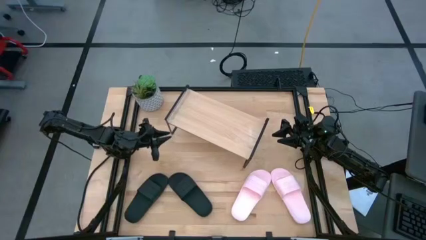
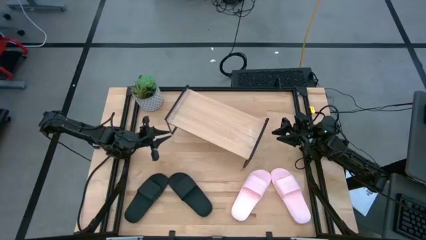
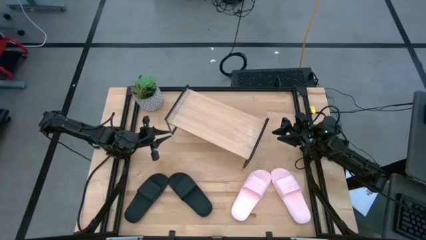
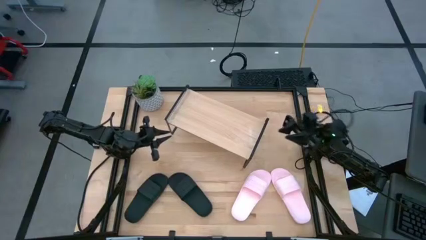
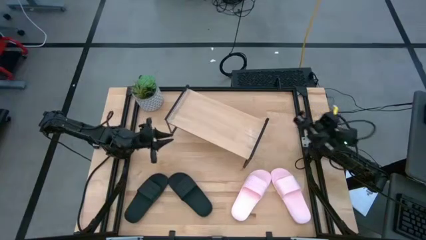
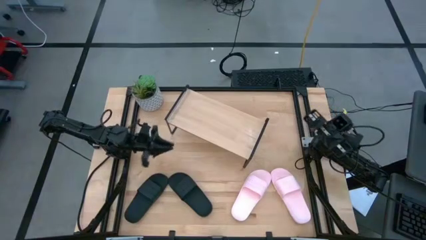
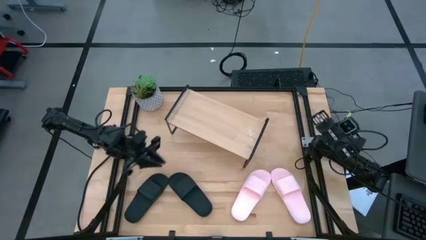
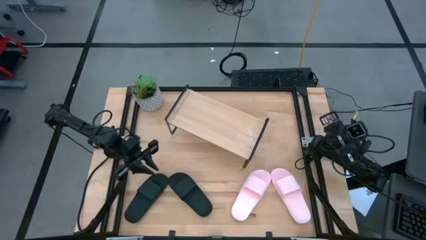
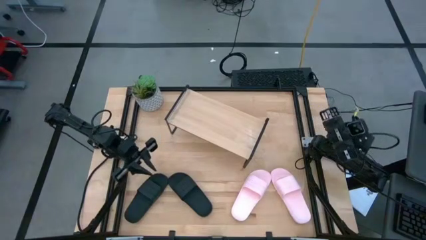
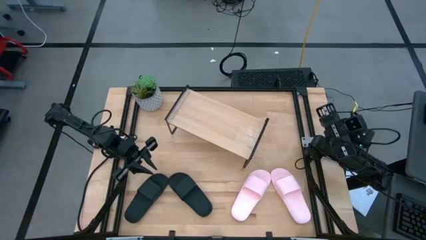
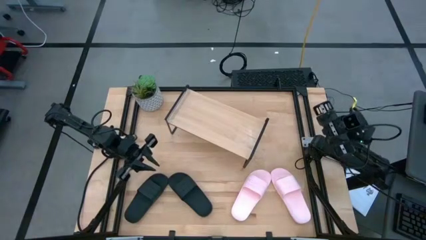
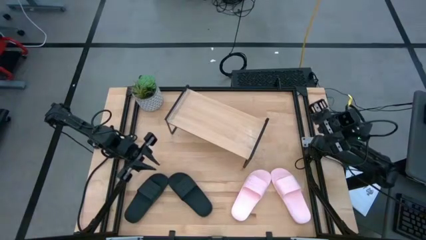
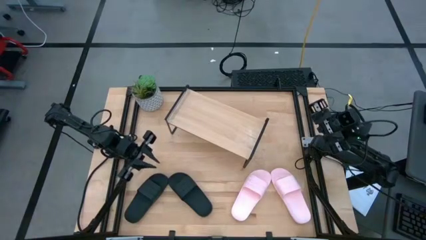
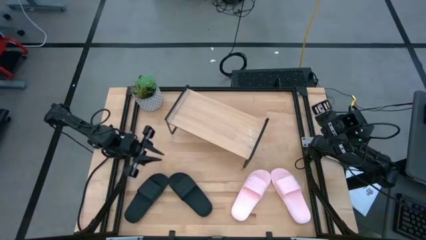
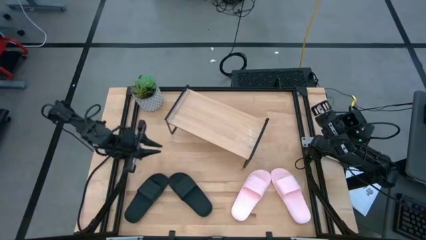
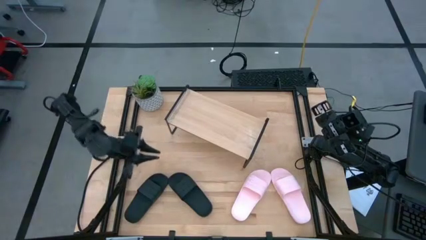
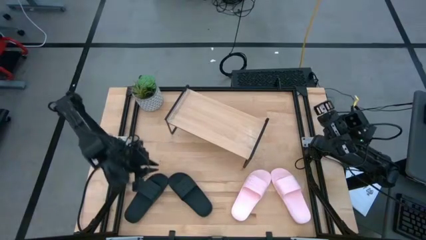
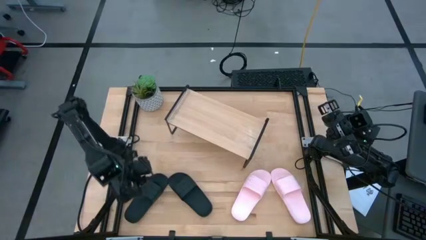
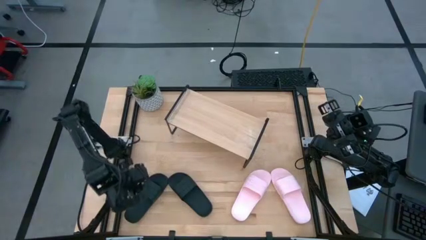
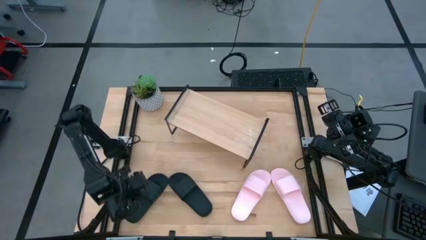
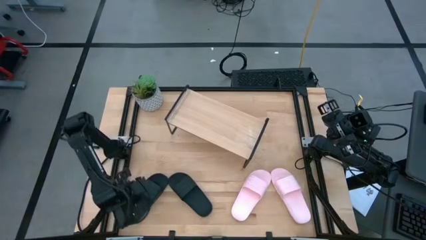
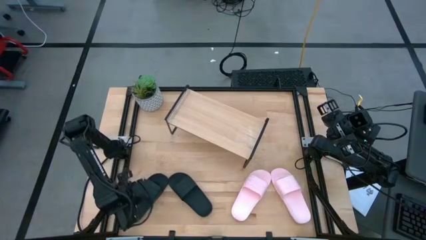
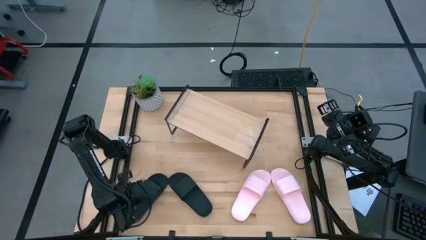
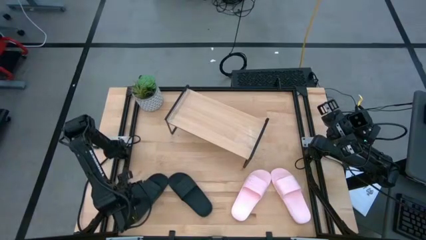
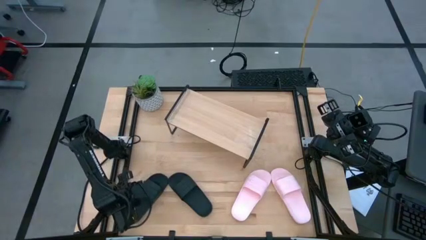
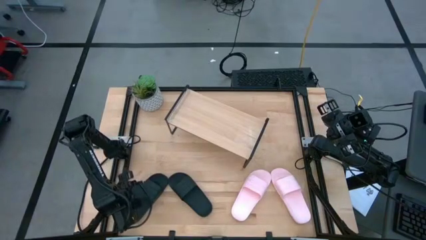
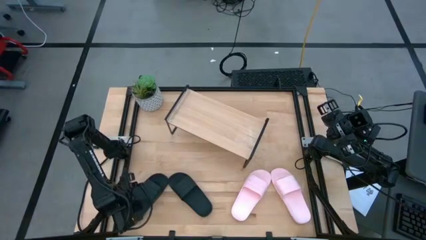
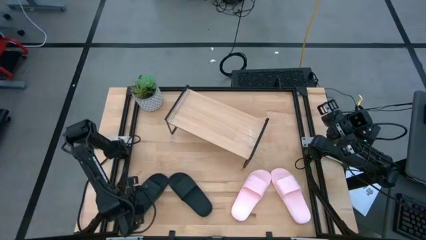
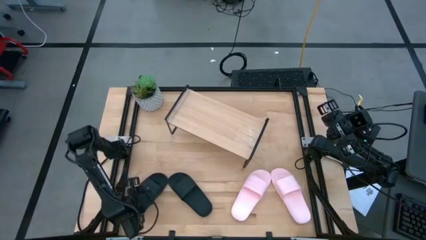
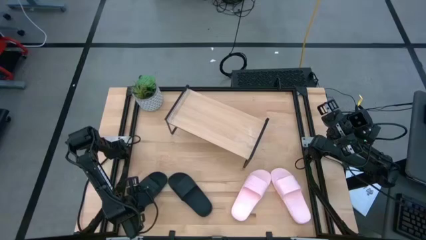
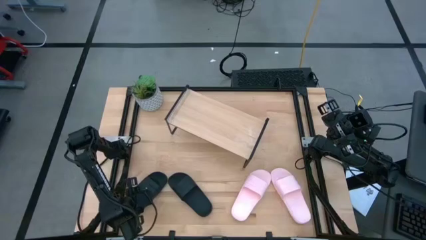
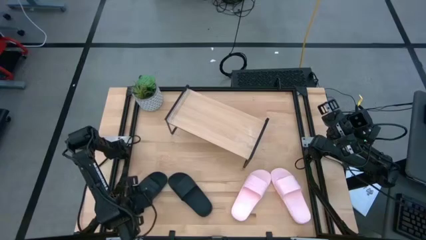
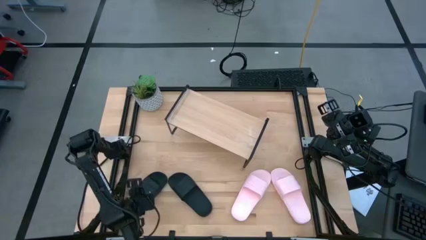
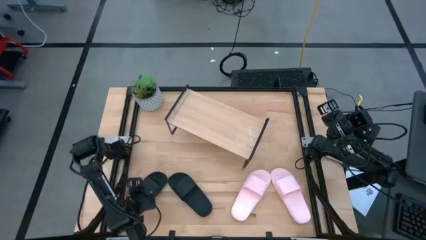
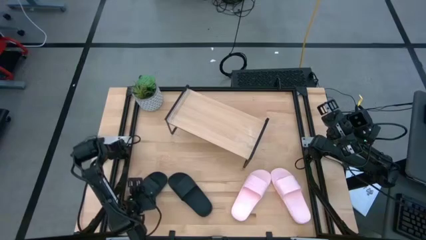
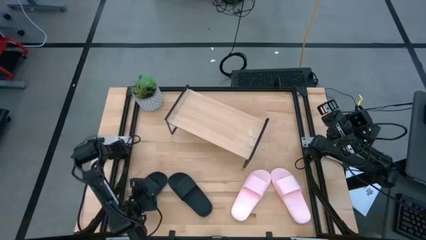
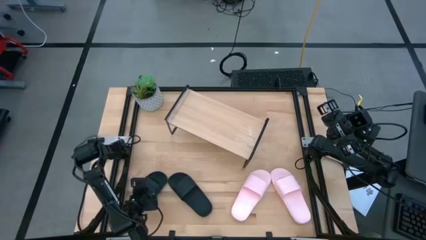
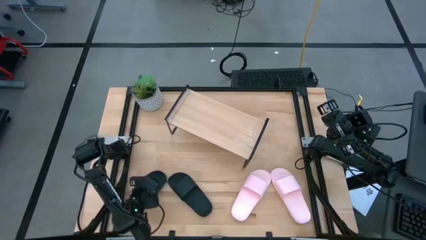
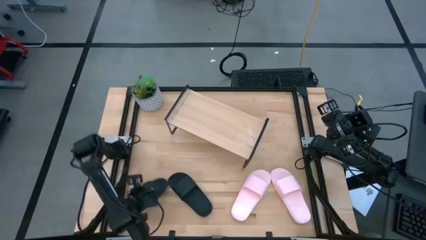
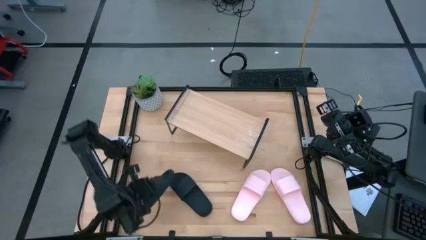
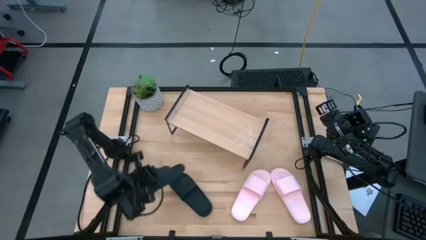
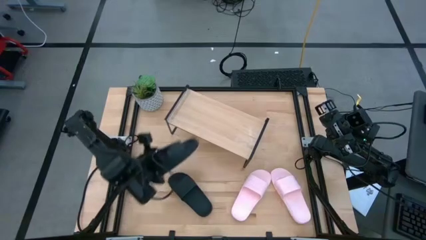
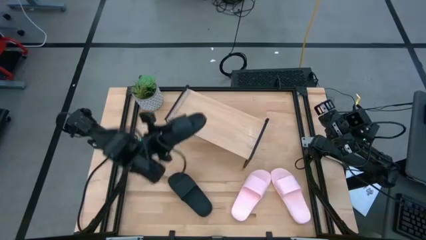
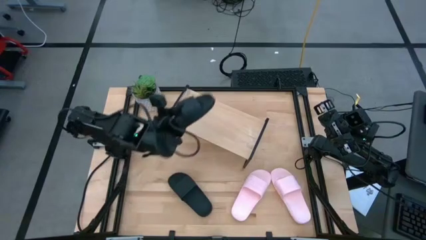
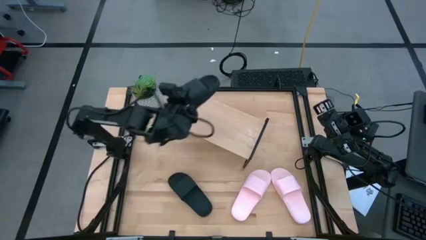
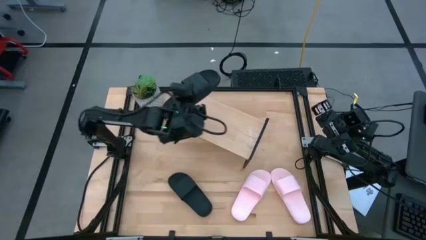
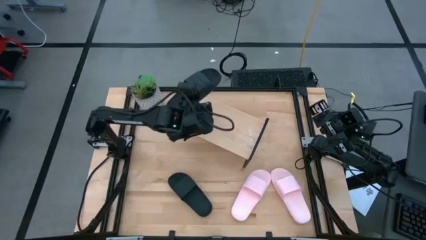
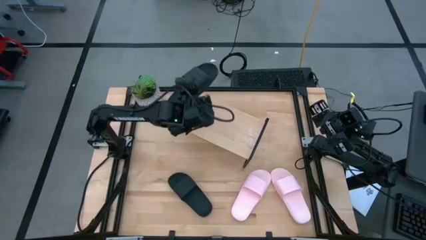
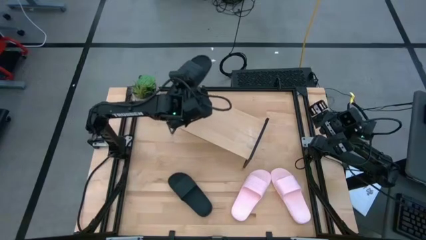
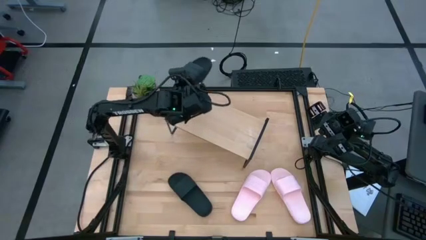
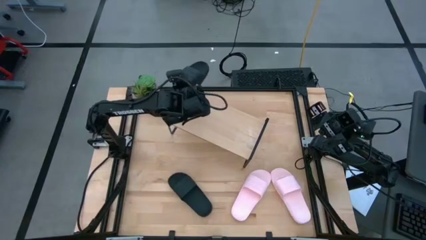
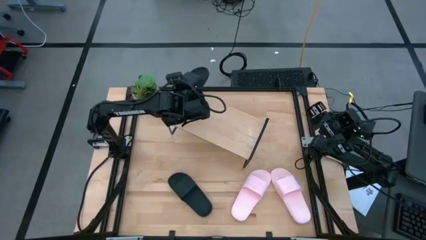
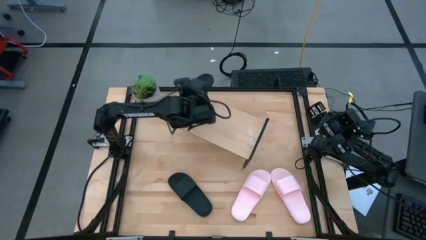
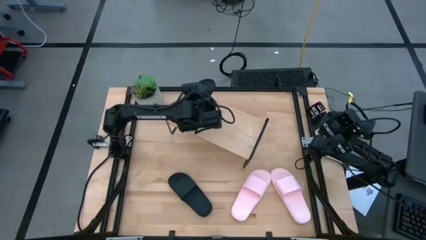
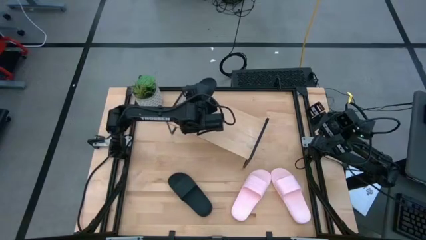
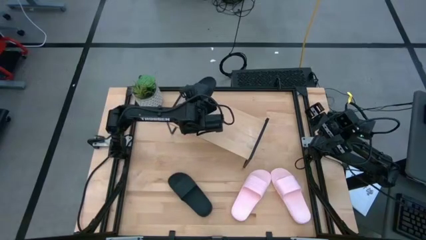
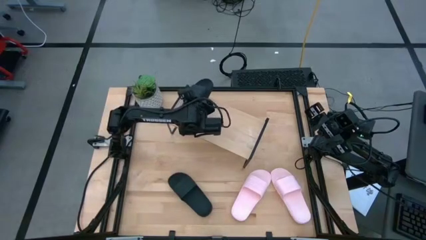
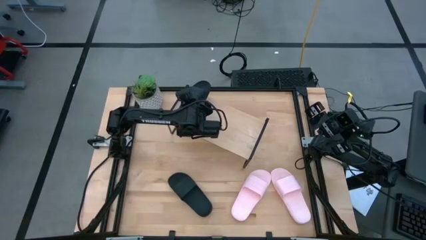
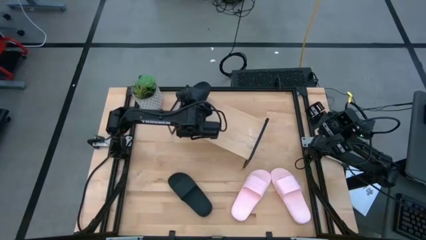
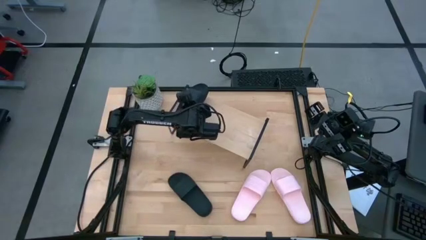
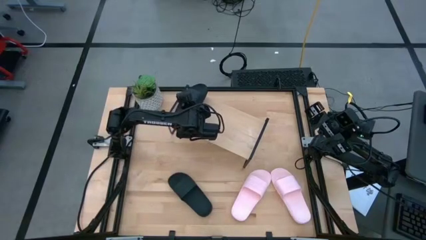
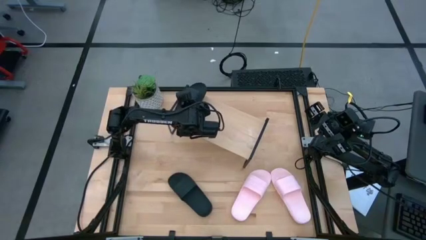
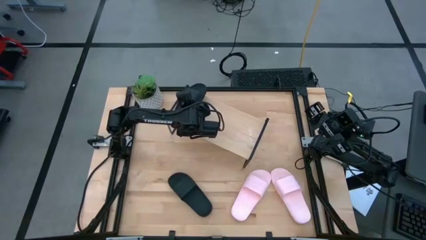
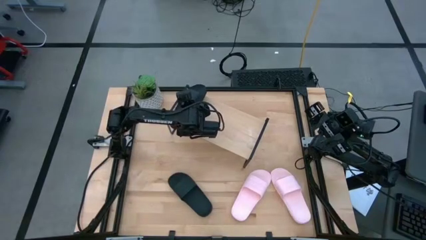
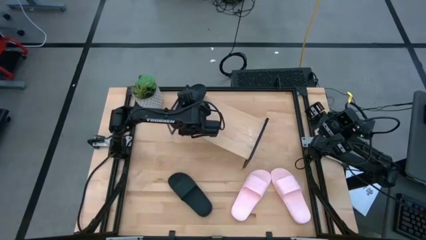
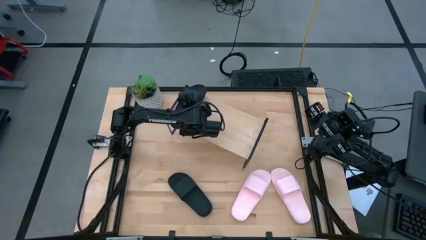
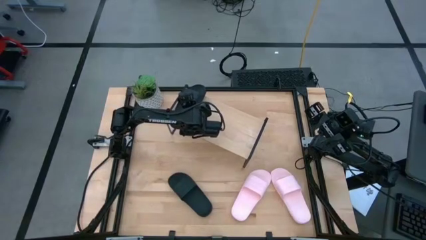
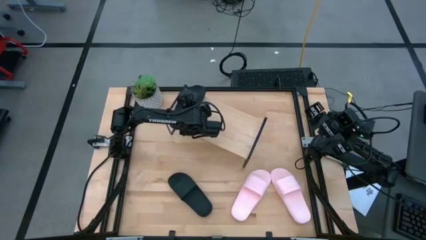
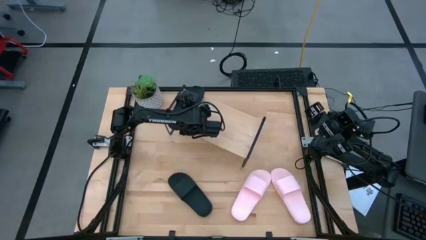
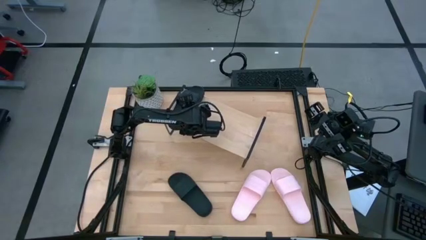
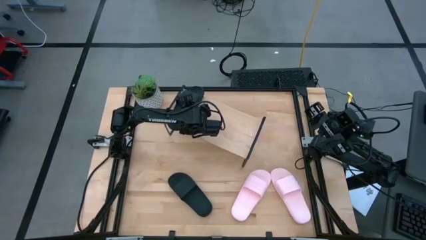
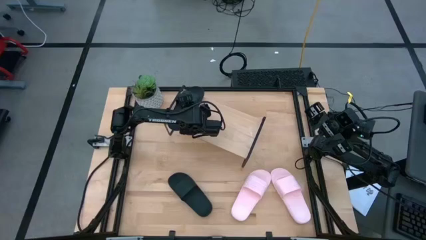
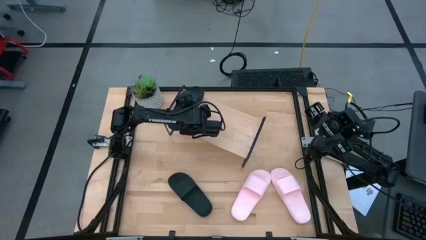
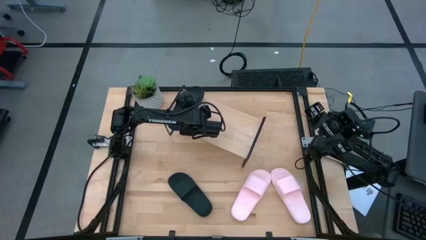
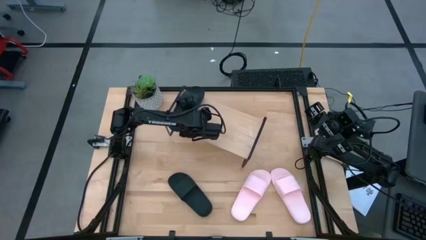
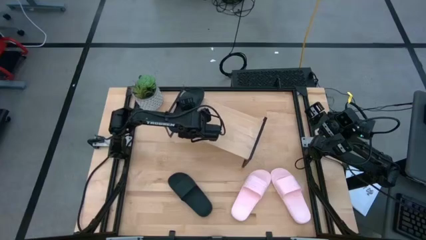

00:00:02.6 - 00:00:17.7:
Task: Pick and place slides into the shelf
Put the left black slide on the shelf
